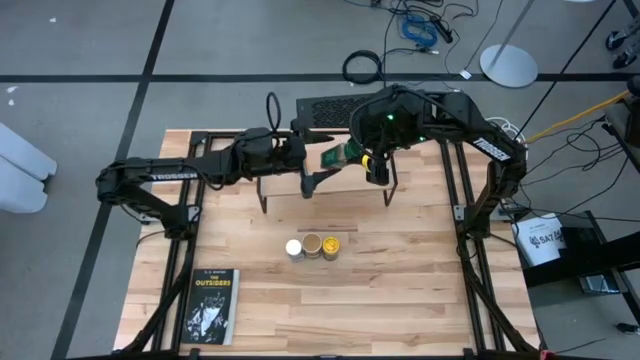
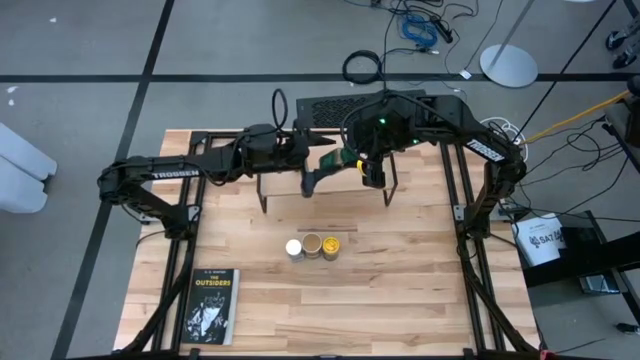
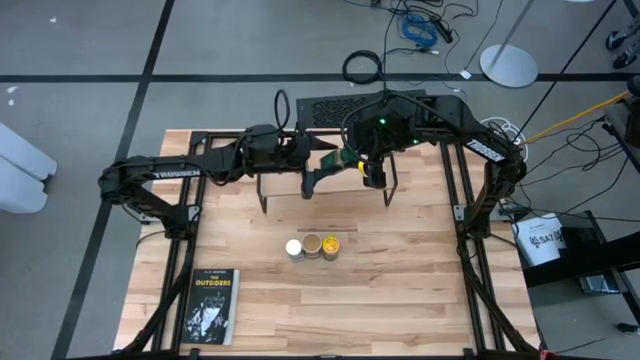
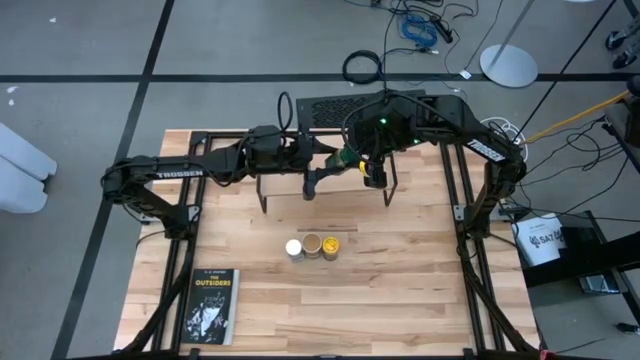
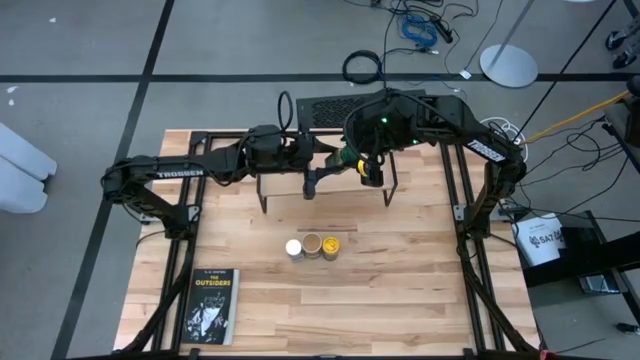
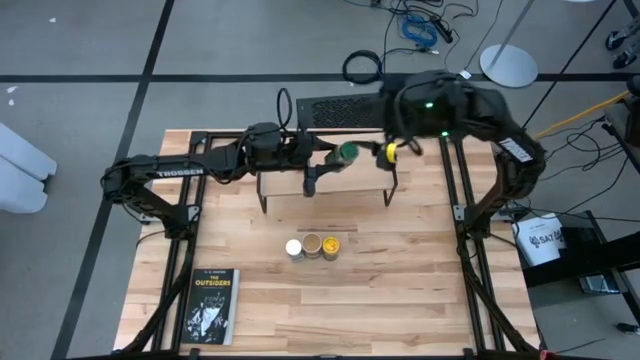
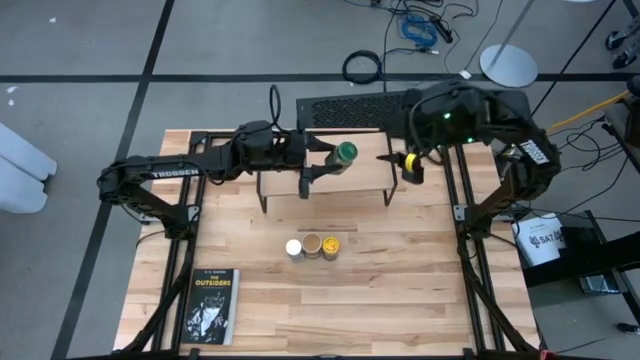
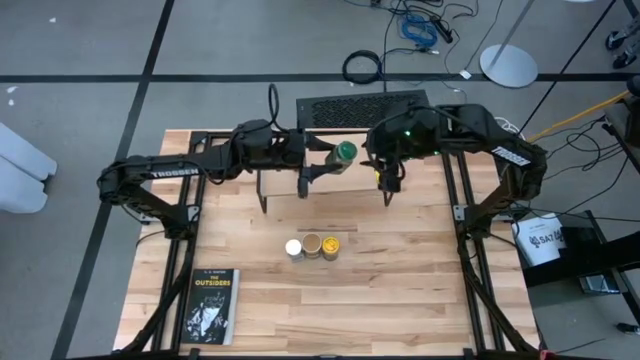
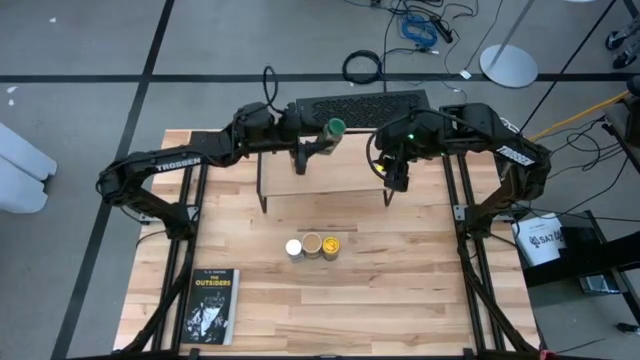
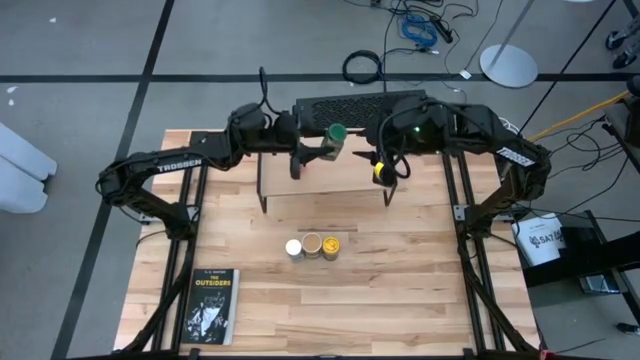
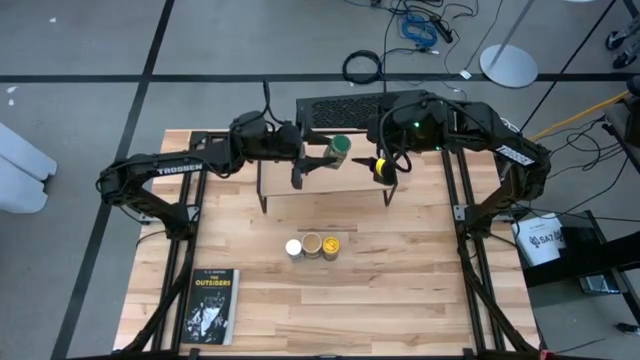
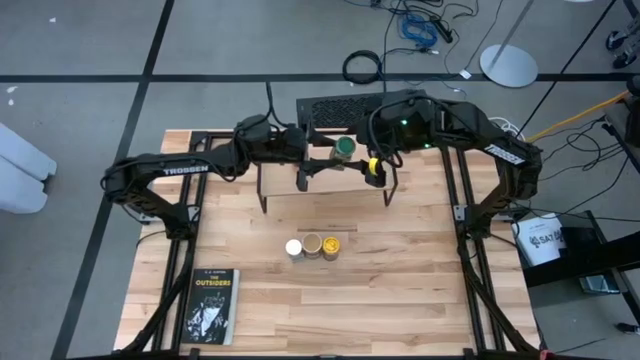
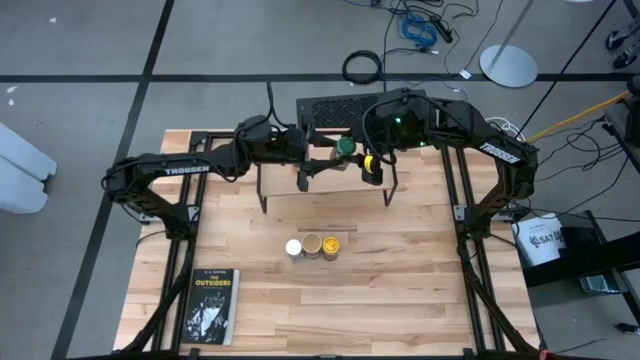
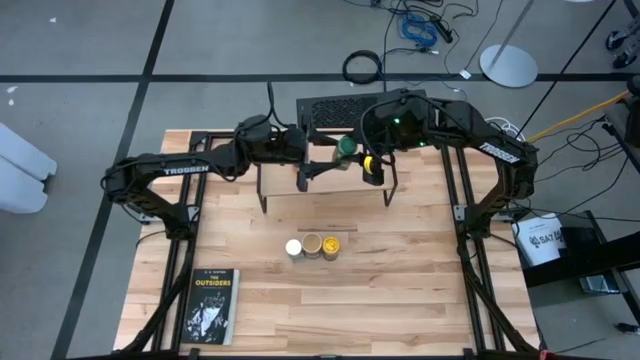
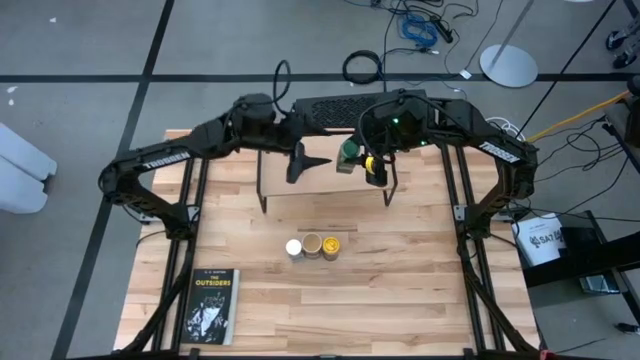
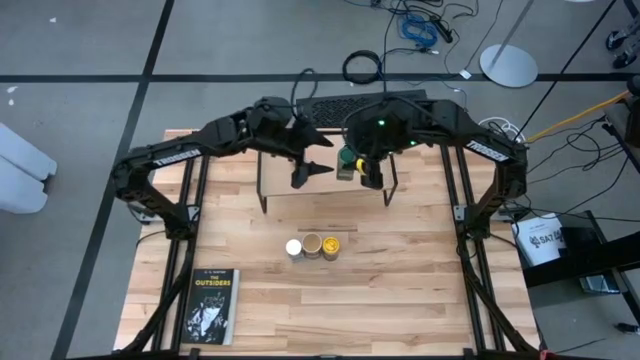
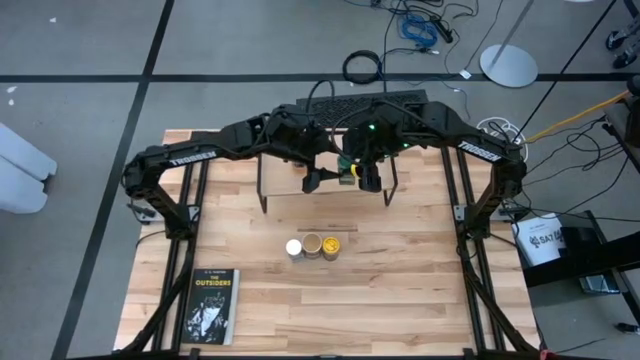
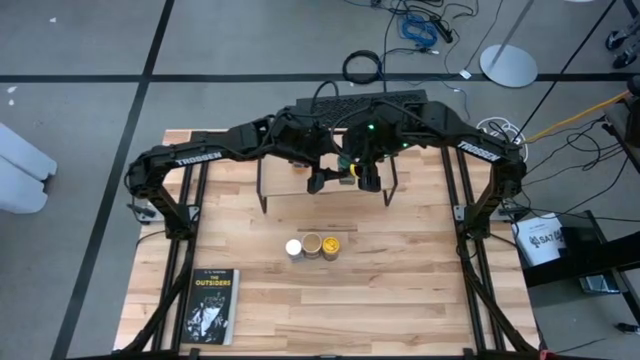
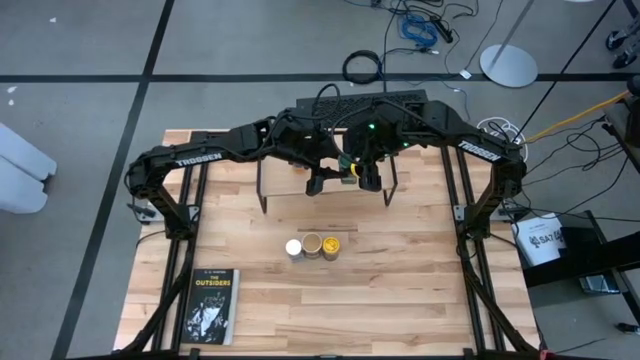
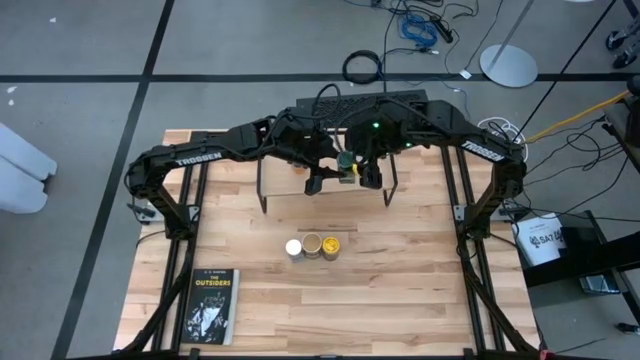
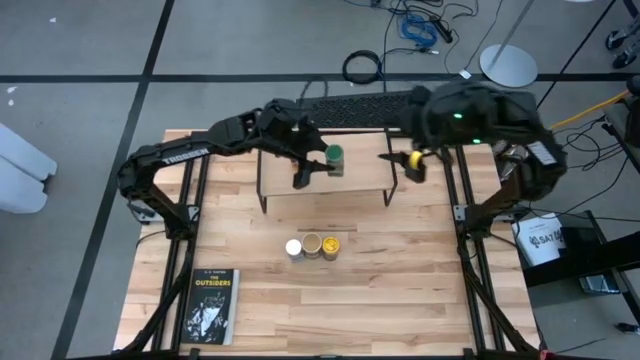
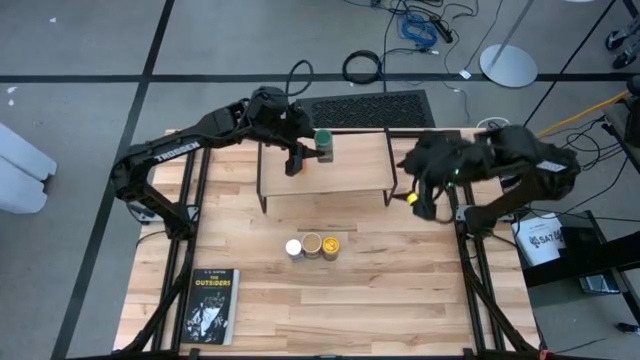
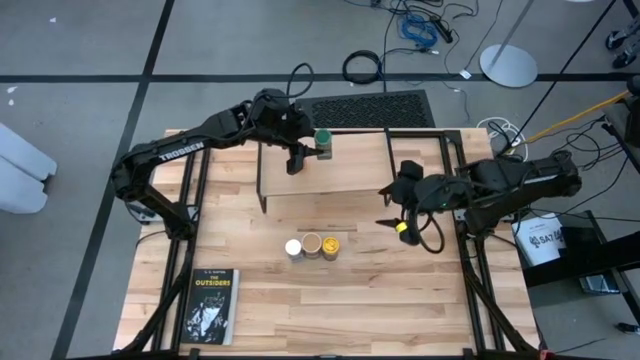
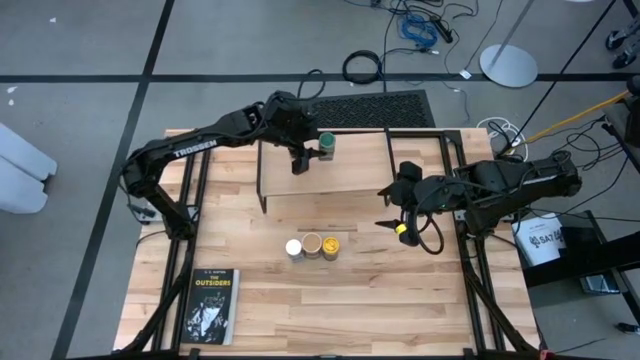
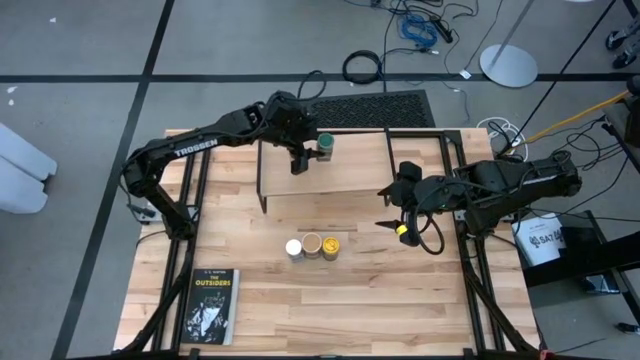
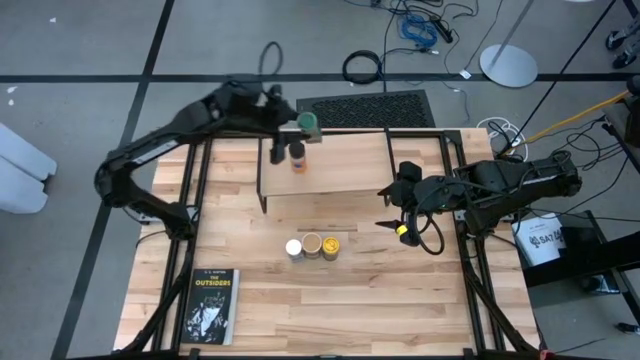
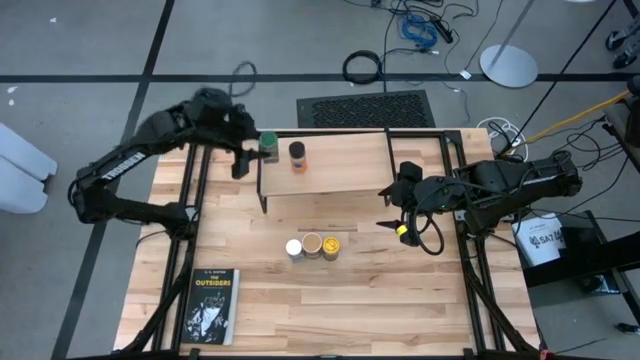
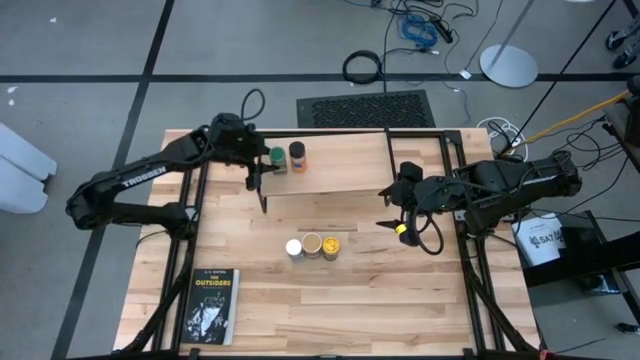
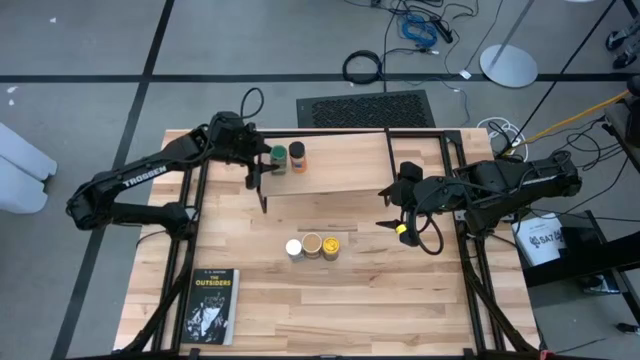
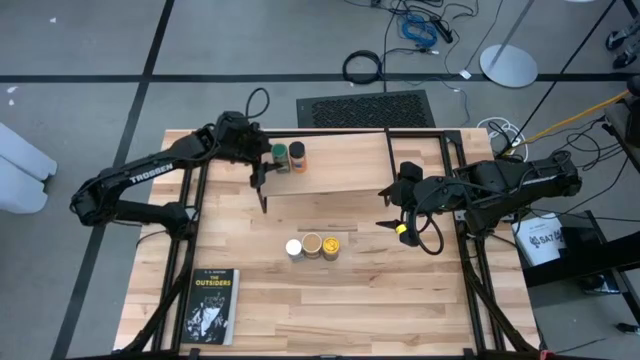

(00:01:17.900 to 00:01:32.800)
Task: Shelf spices
Put the green seasoning bottle on the shelf

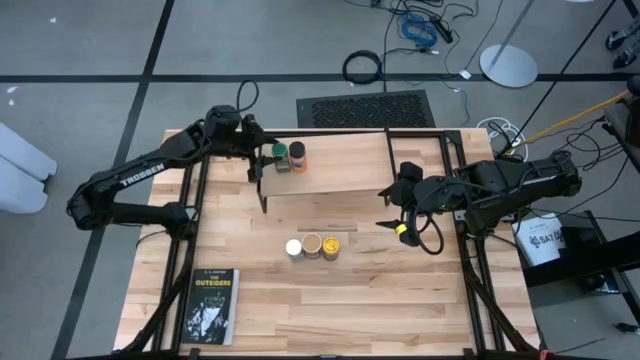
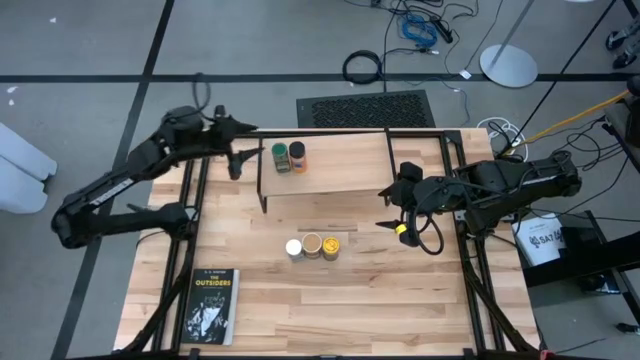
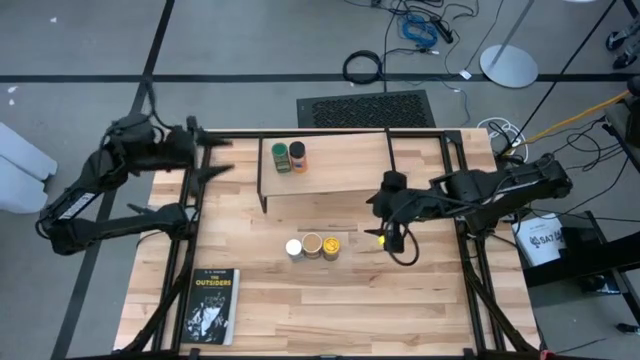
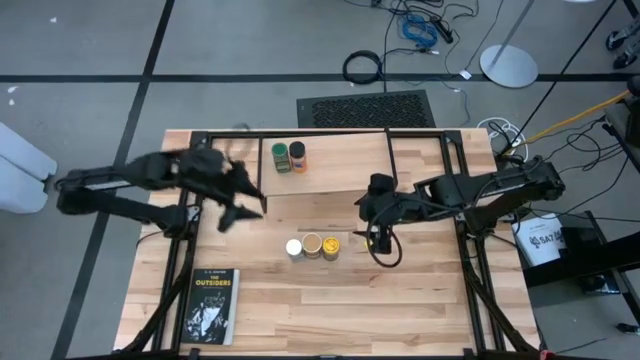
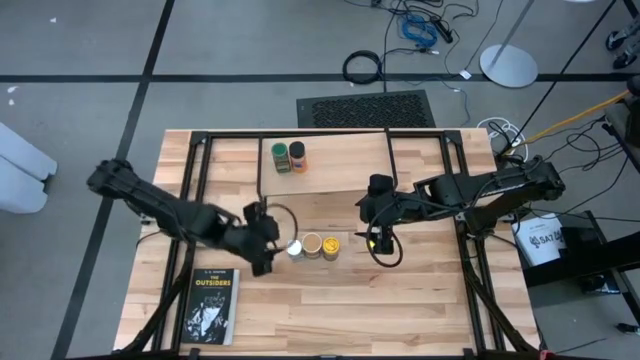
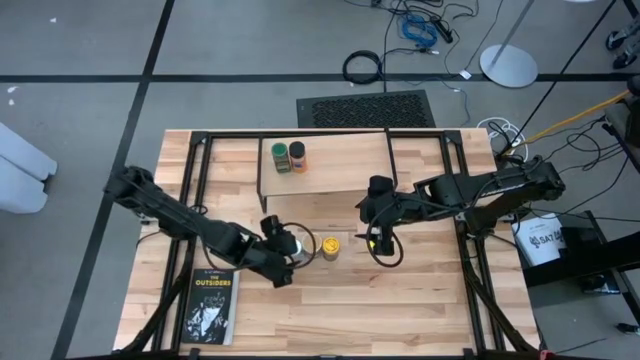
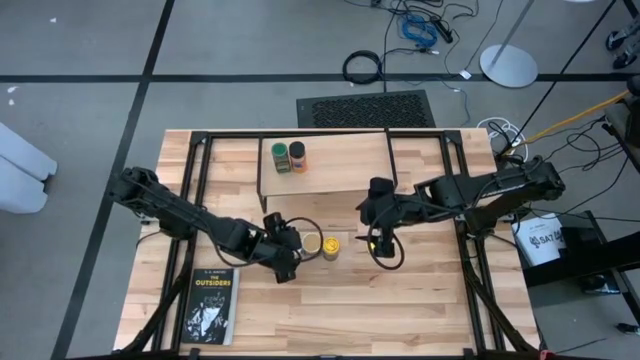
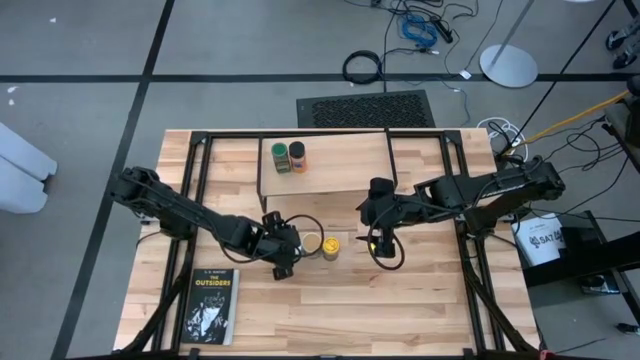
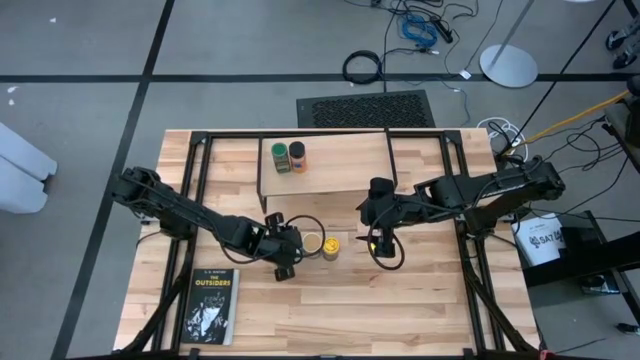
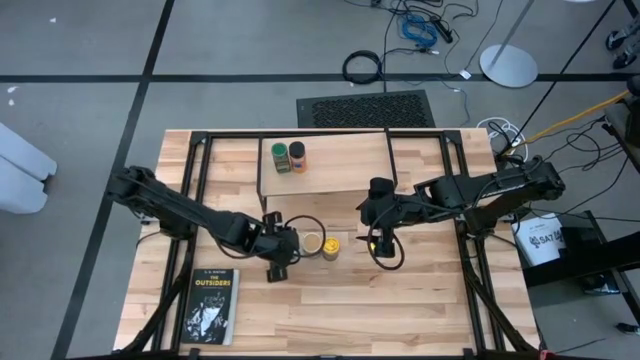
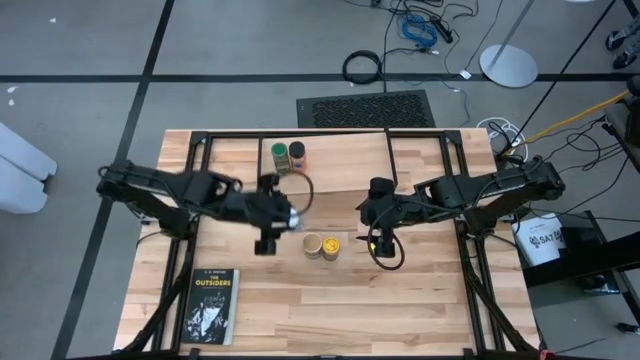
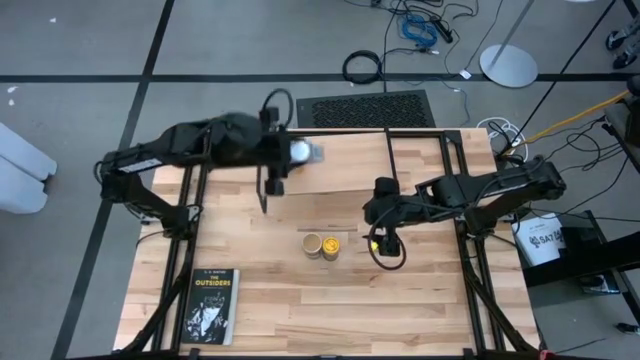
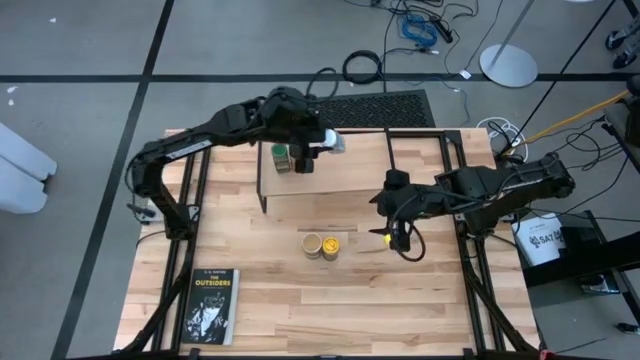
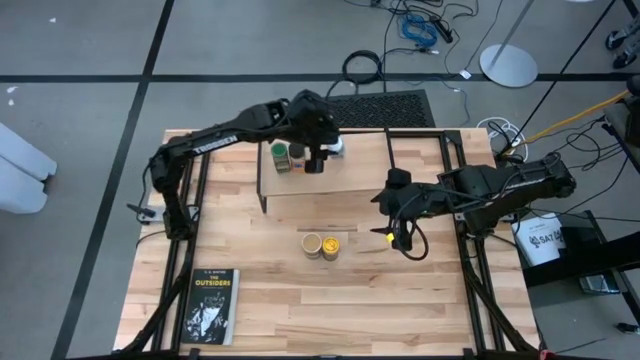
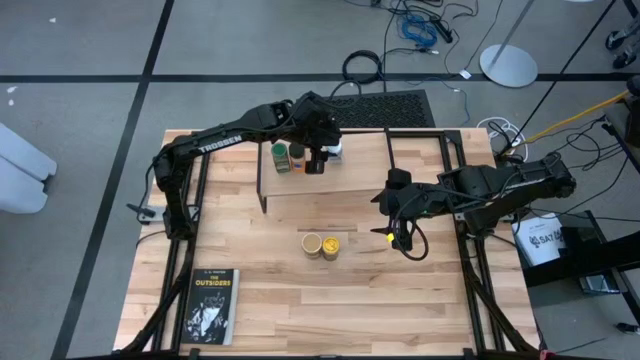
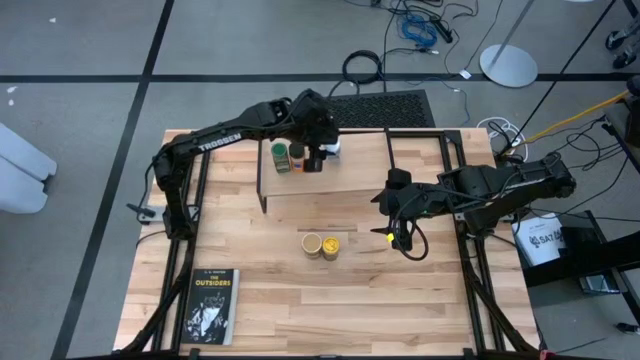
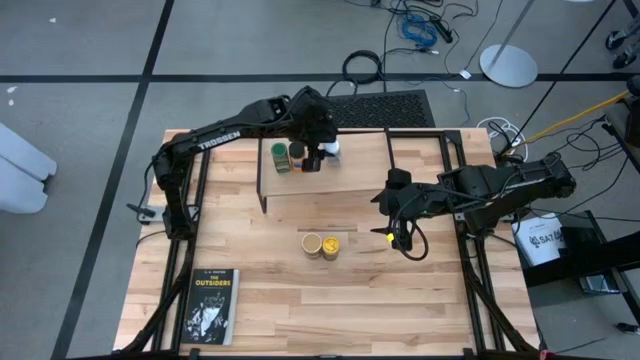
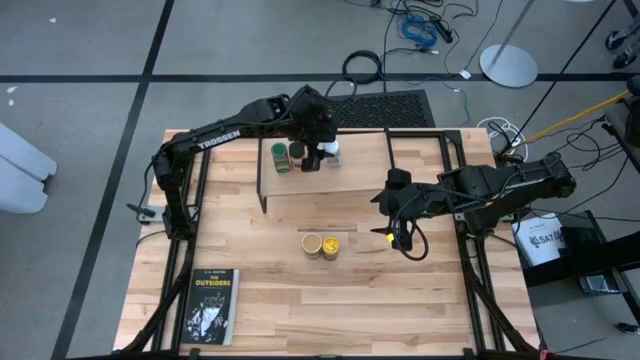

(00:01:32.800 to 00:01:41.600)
Put the white seasoning bottle on the shelf
